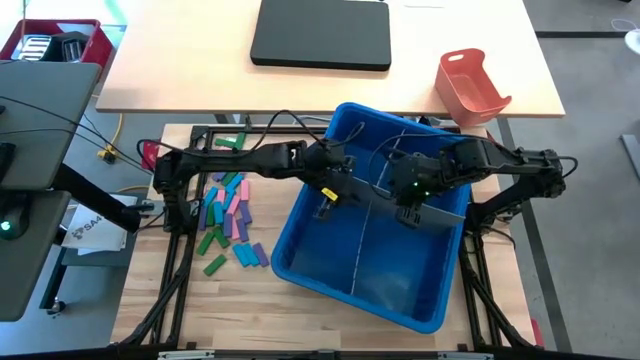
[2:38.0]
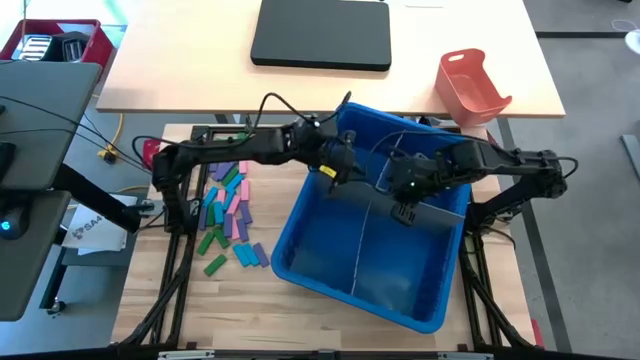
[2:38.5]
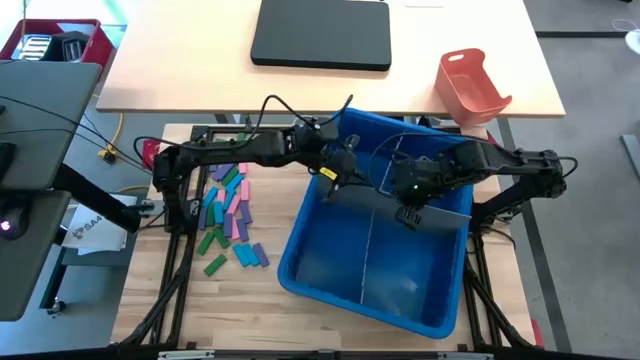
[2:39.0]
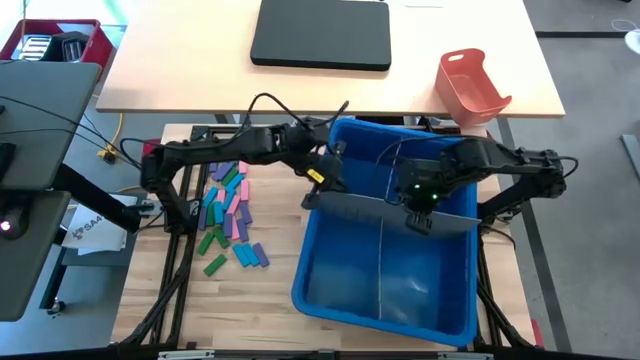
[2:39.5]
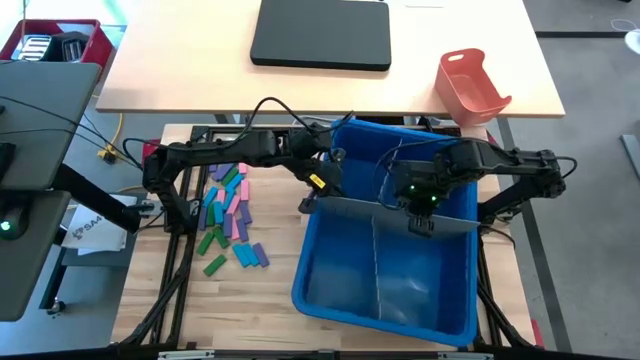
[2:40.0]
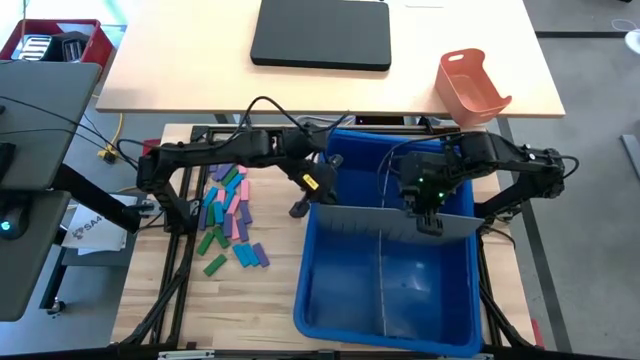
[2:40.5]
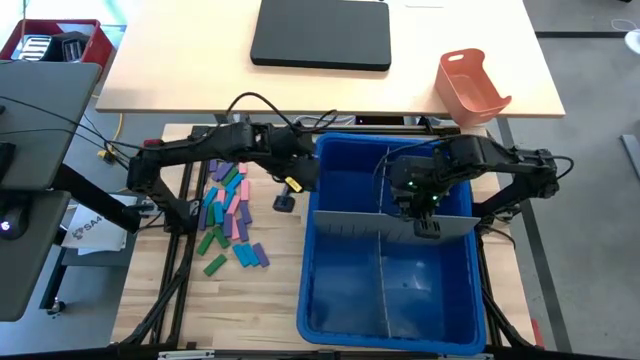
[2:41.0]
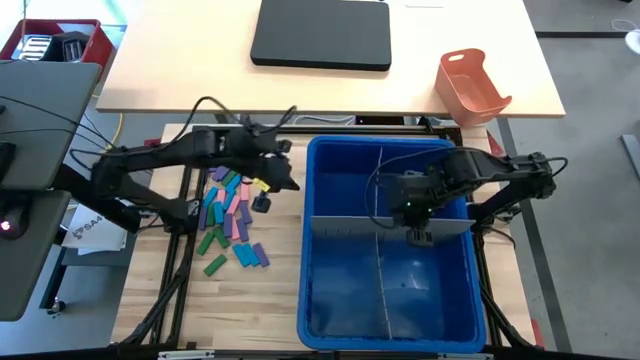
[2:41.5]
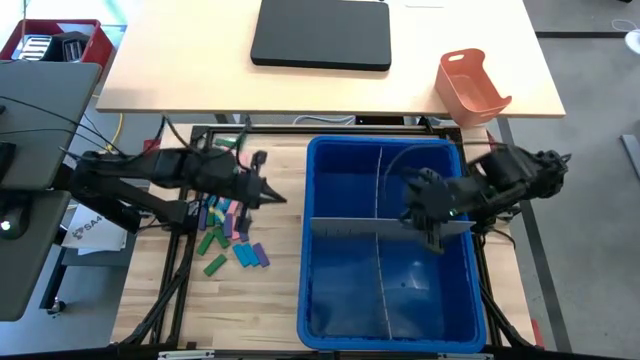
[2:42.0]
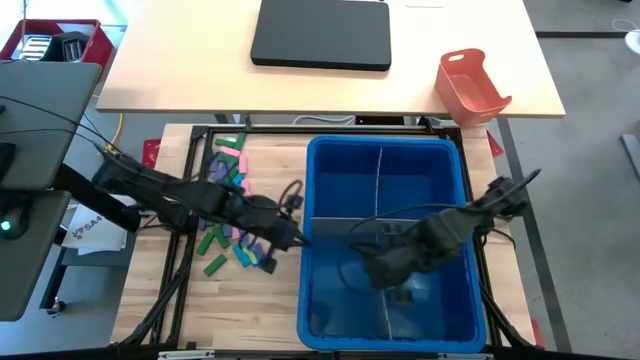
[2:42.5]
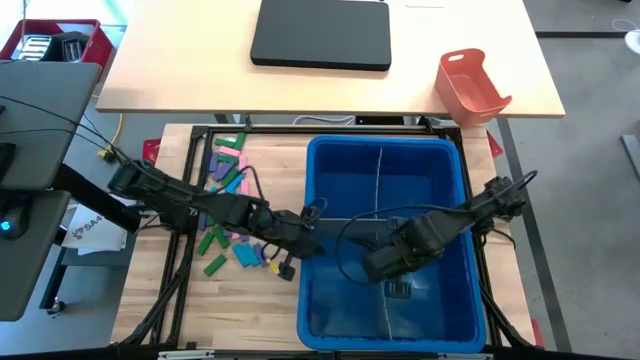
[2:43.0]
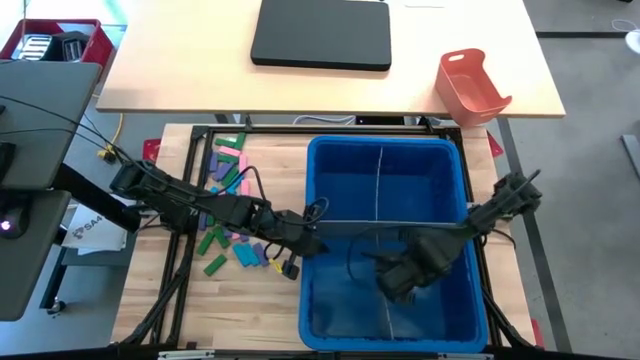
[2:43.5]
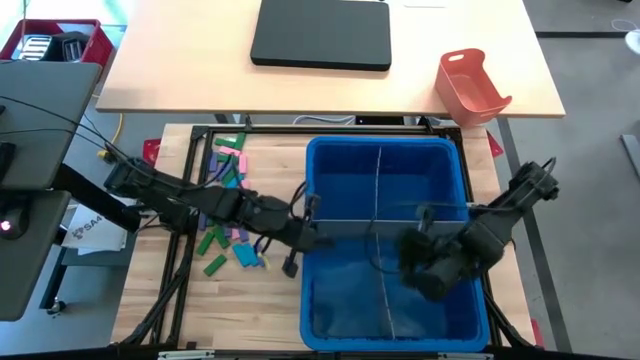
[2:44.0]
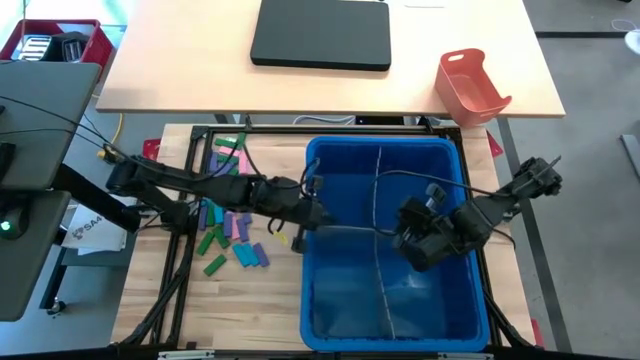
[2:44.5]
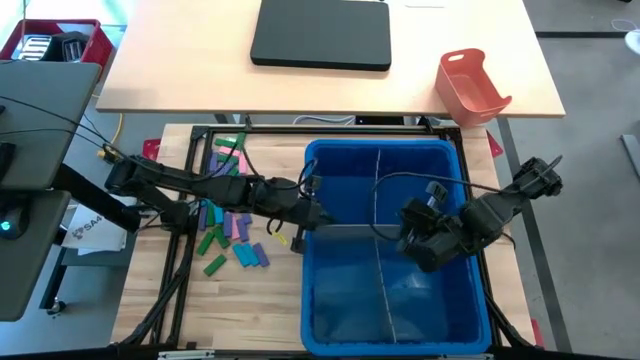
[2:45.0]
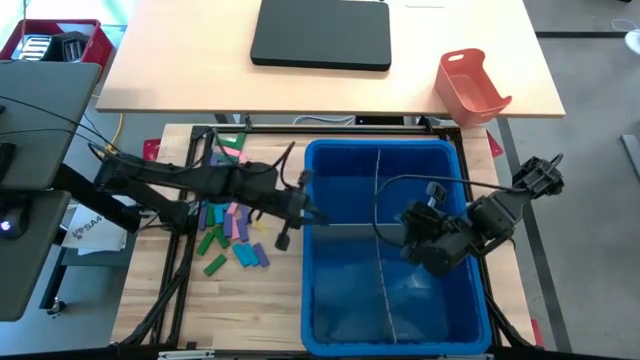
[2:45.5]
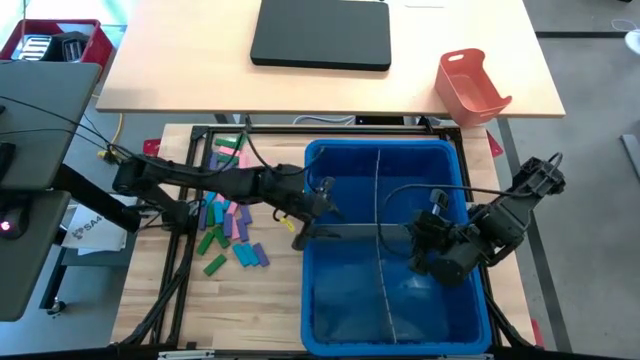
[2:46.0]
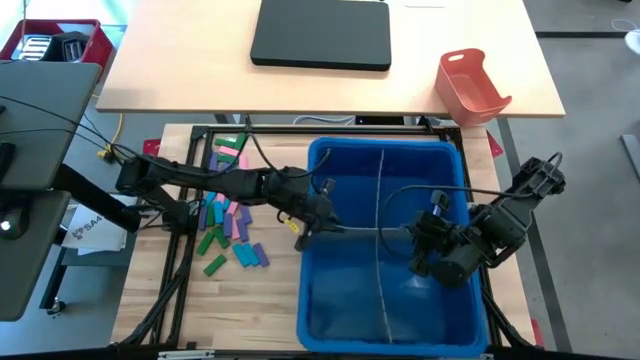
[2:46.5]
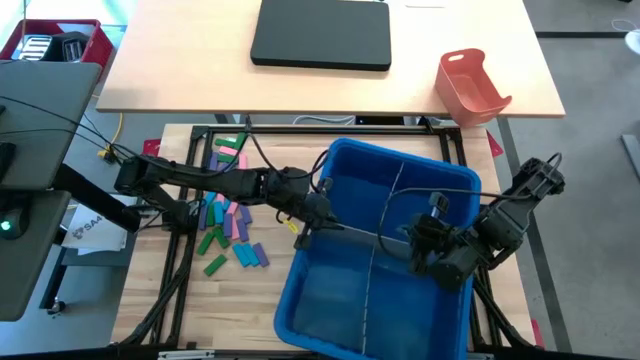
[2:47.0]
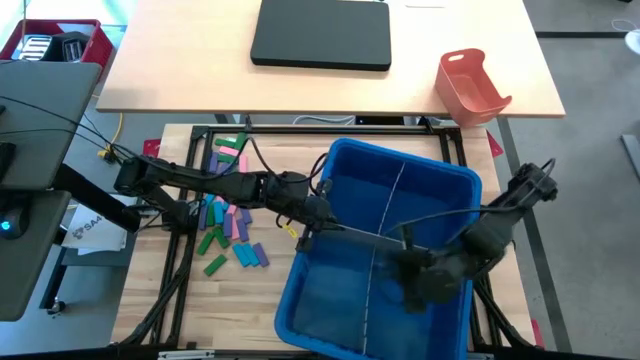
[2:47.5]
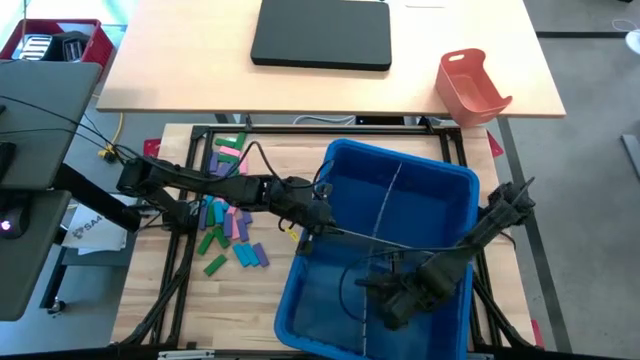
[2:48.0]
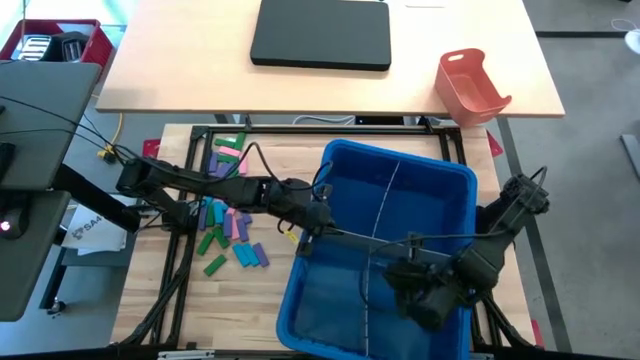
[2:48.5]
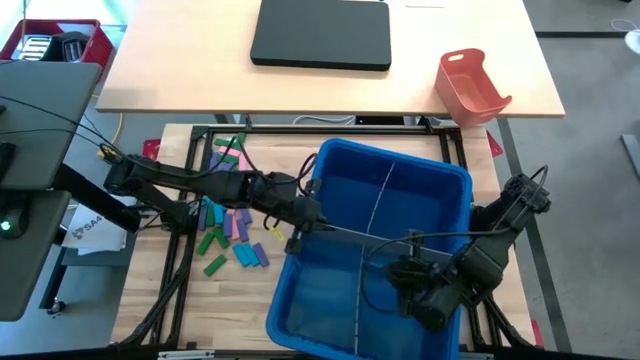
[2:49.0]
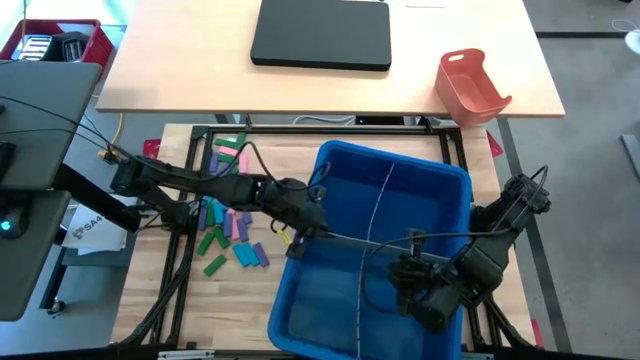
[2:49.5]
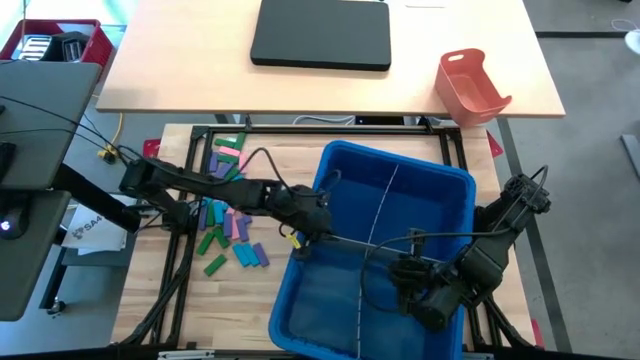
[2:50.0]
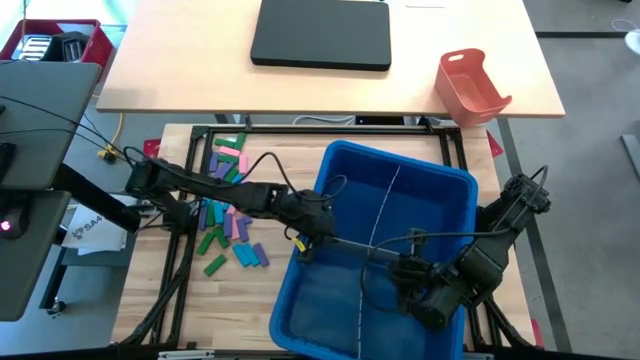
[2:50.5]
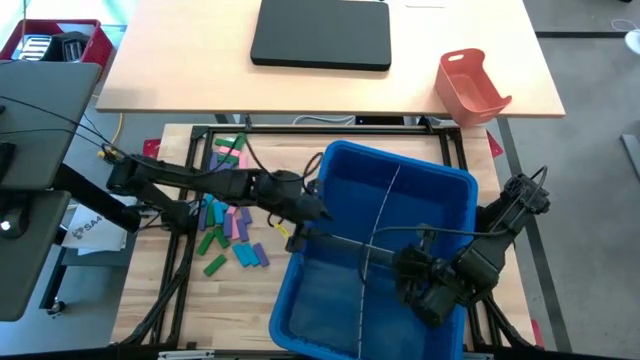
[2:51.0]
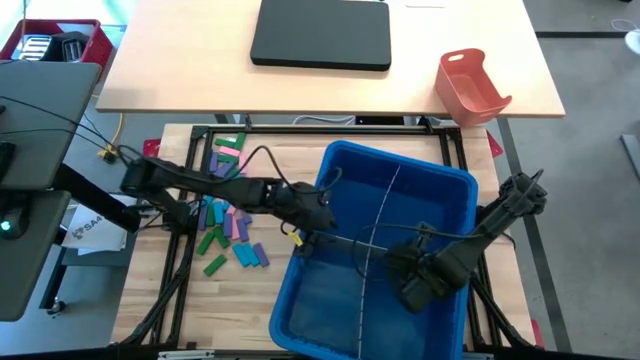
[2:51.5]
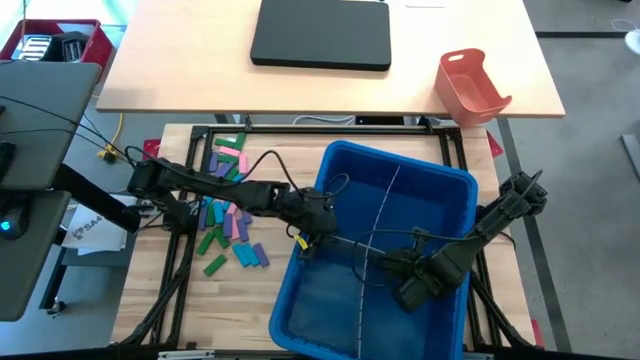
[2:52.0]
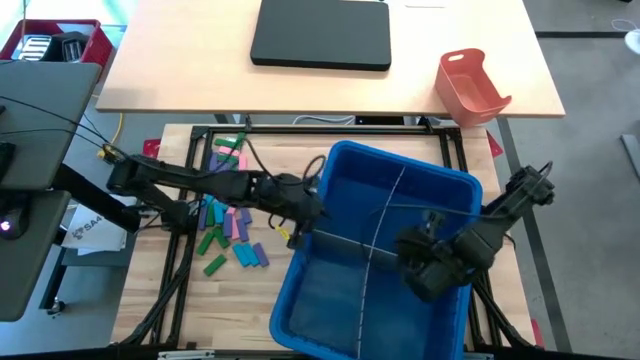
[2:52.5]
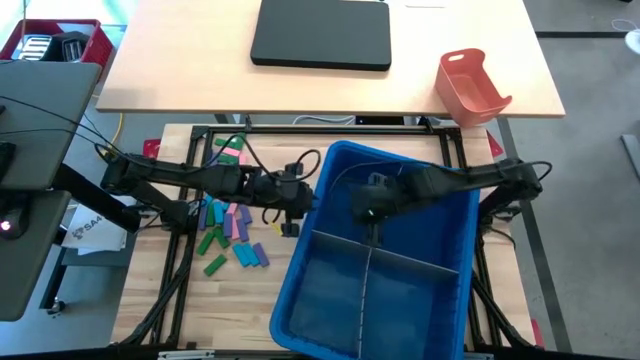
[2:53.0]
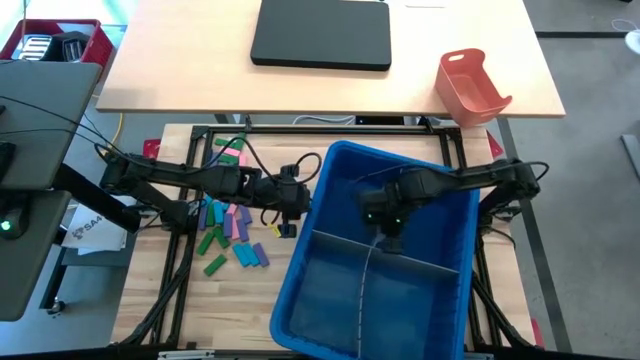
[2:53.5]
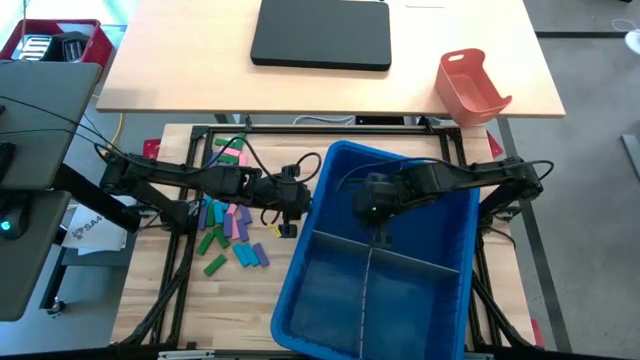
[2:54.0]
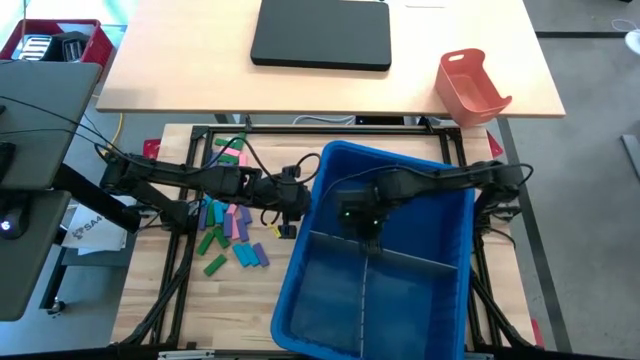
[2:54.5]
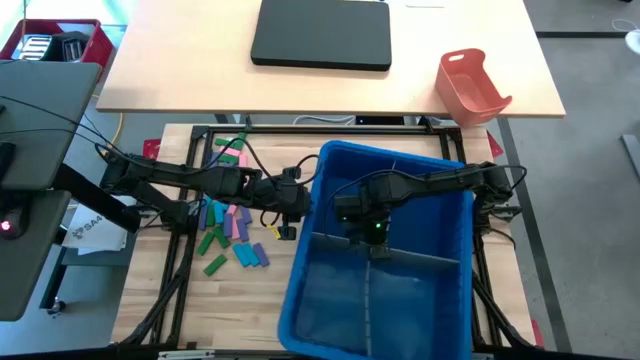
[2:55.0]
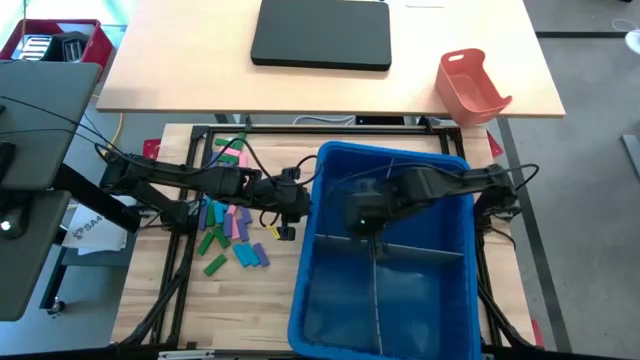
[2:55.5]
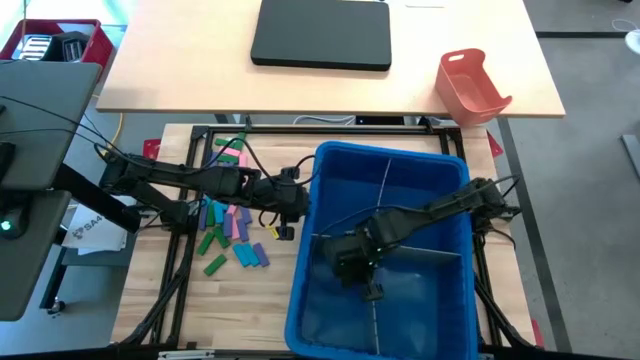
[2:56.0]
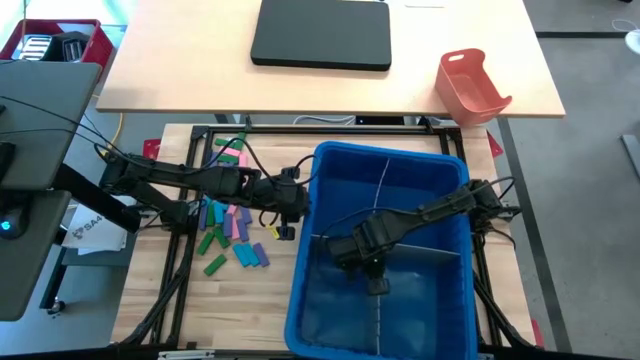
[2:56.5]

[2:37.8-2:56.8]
Task: Sort blocks
Insert the bin divider into the blue bin

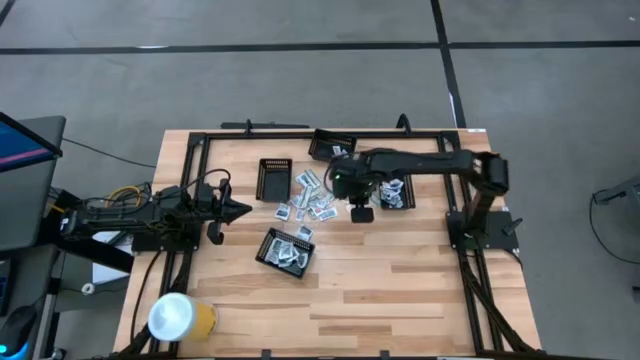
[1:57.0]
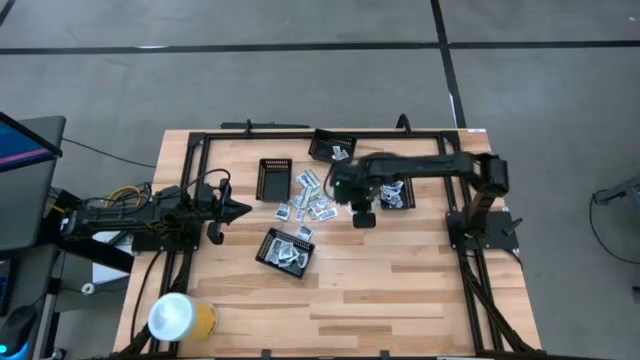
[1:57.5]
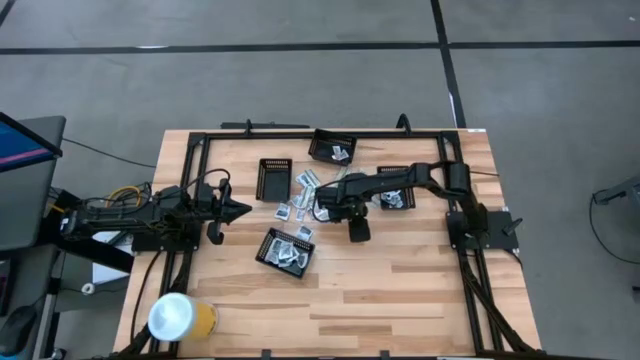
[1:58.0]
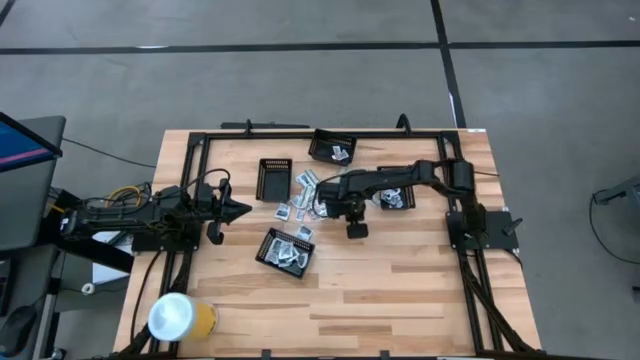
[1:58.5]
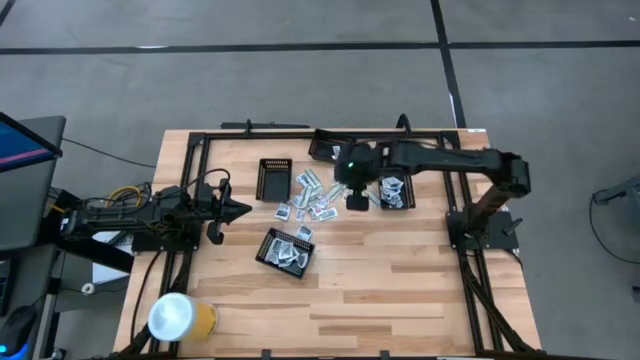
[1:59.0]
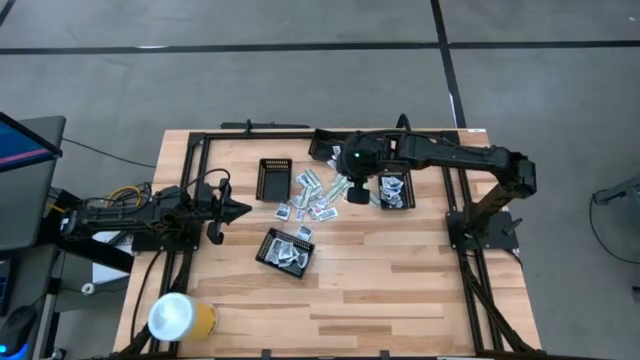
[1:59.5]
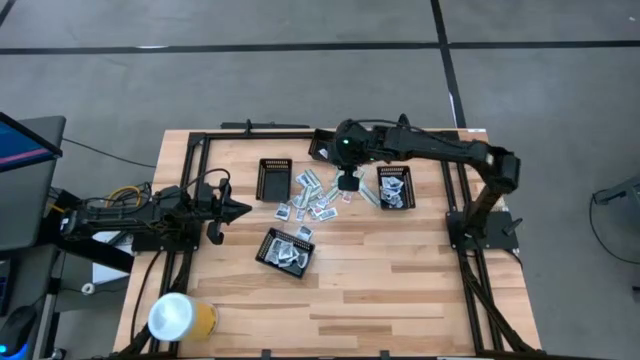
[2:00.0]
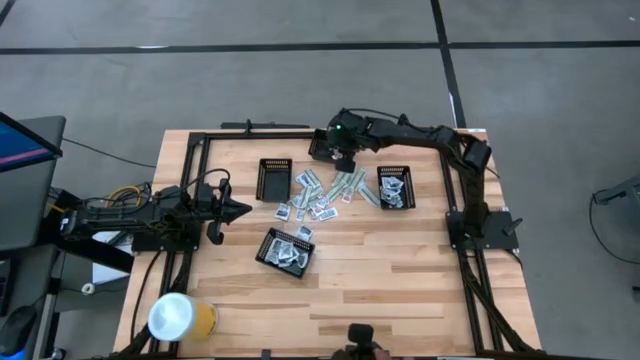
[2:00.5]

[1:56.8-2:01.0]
Task: Pick & Place First Aid Supplies
Put the orange ointment pack into the top black bin
